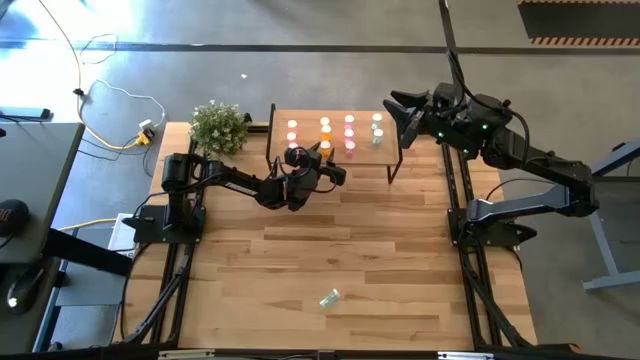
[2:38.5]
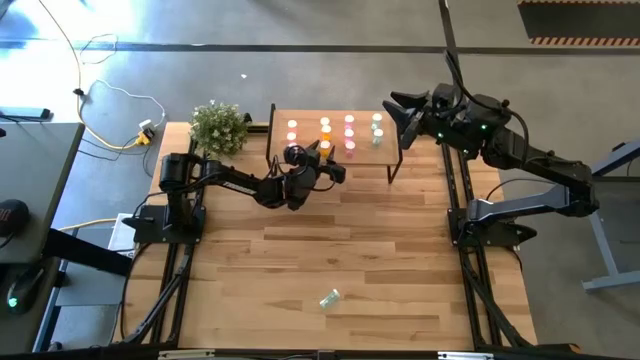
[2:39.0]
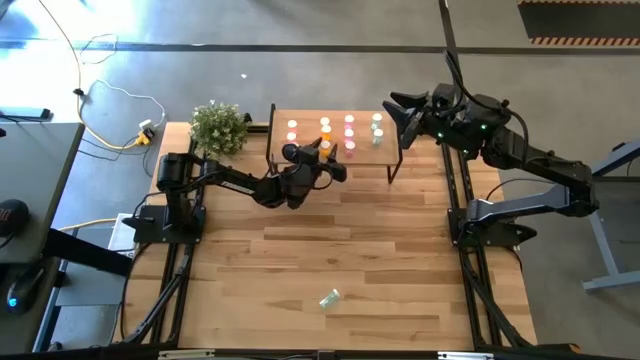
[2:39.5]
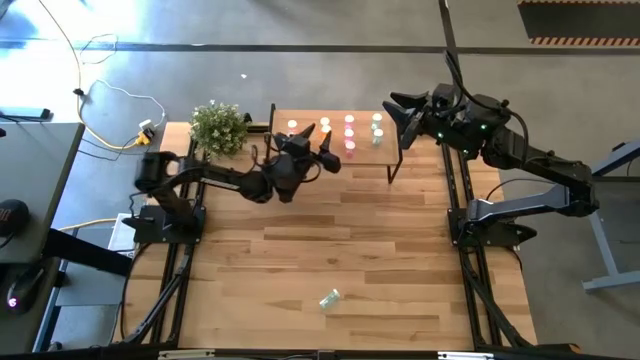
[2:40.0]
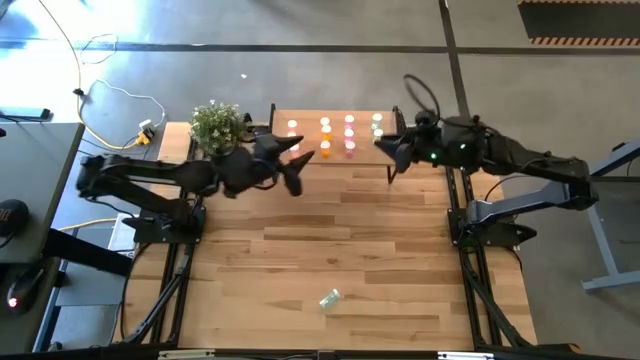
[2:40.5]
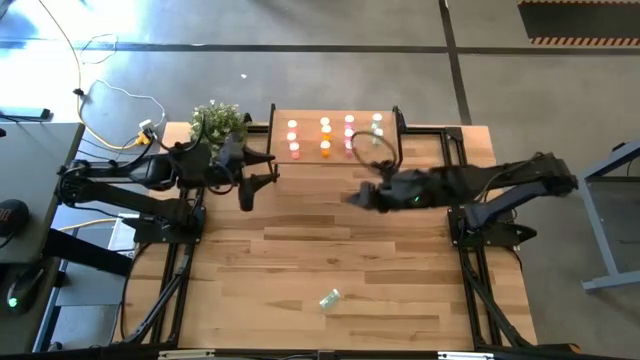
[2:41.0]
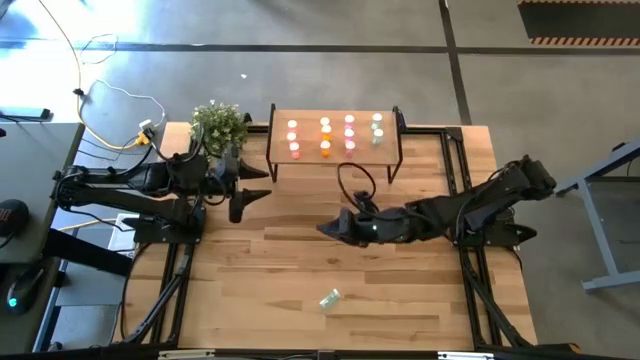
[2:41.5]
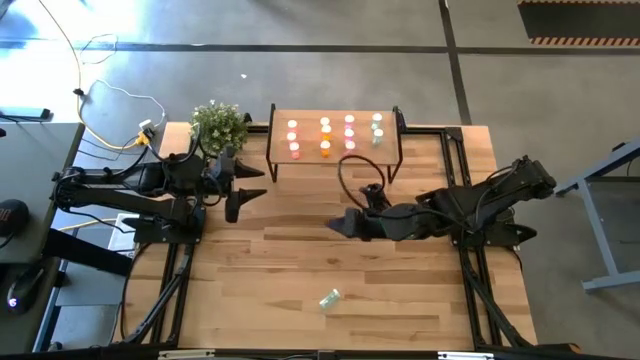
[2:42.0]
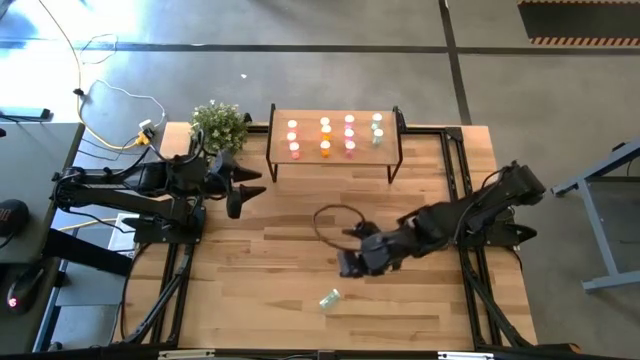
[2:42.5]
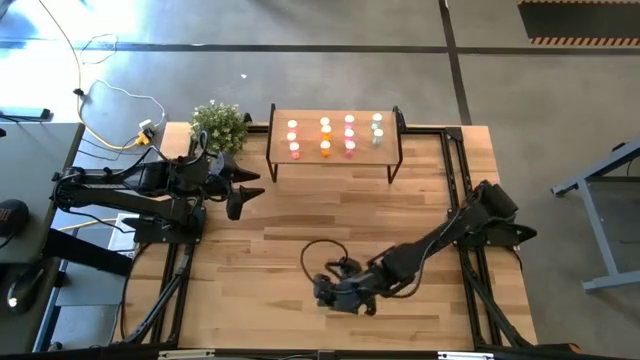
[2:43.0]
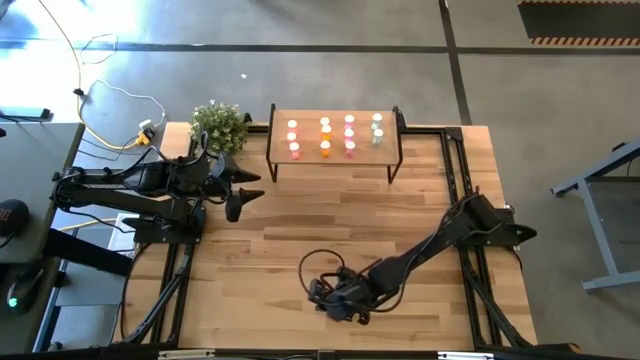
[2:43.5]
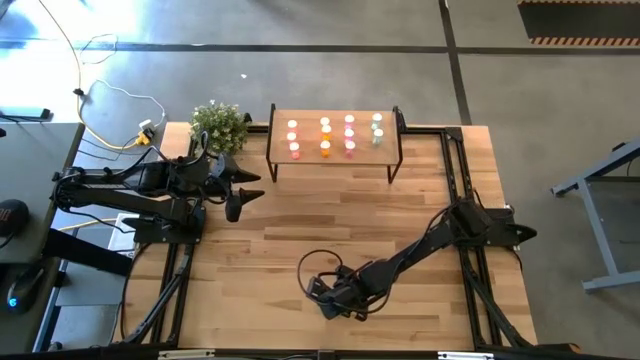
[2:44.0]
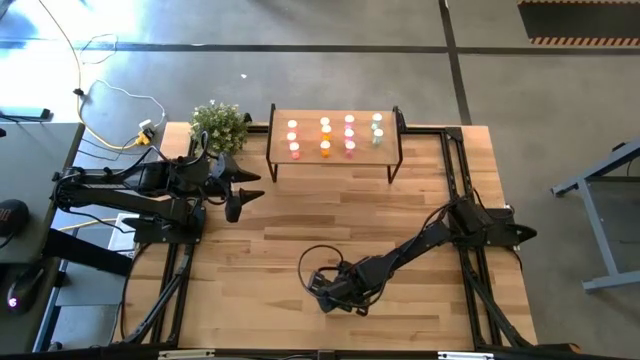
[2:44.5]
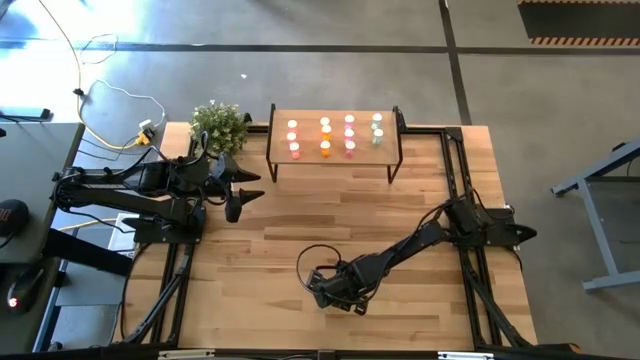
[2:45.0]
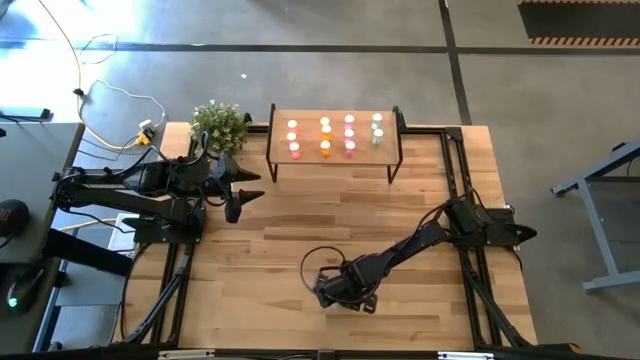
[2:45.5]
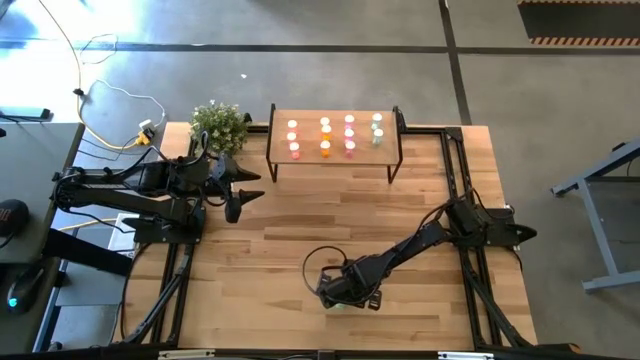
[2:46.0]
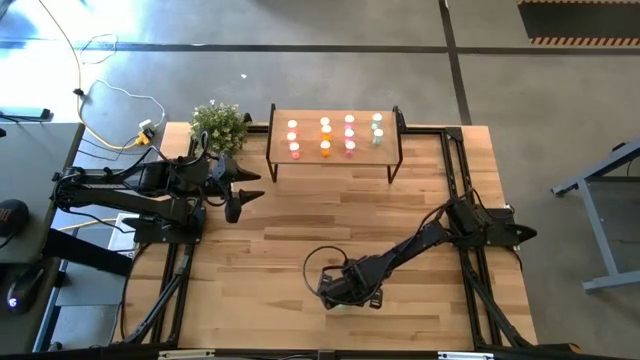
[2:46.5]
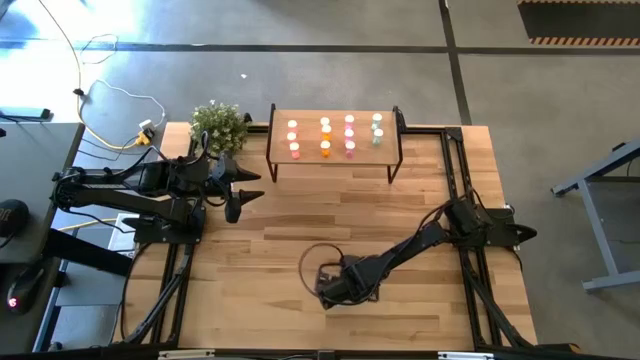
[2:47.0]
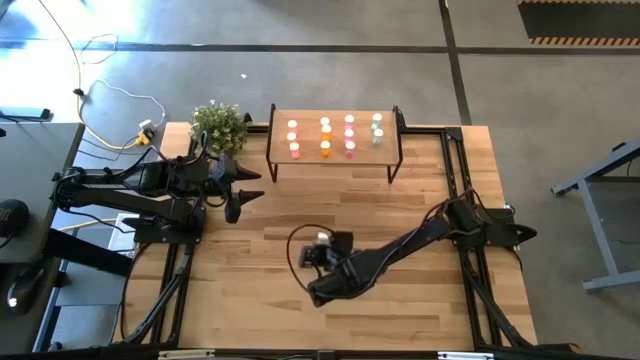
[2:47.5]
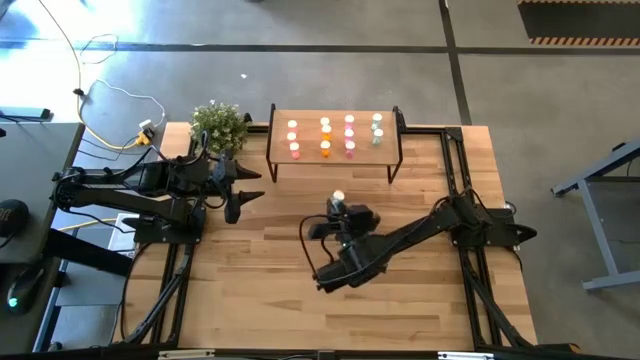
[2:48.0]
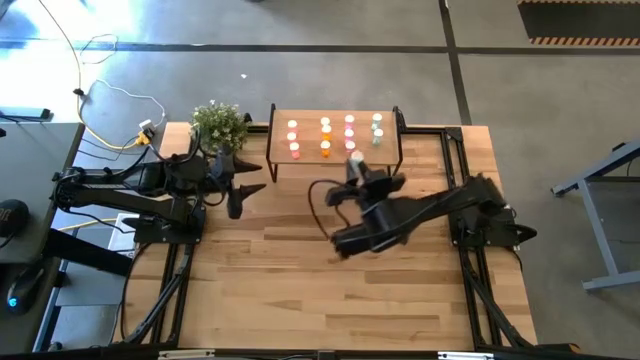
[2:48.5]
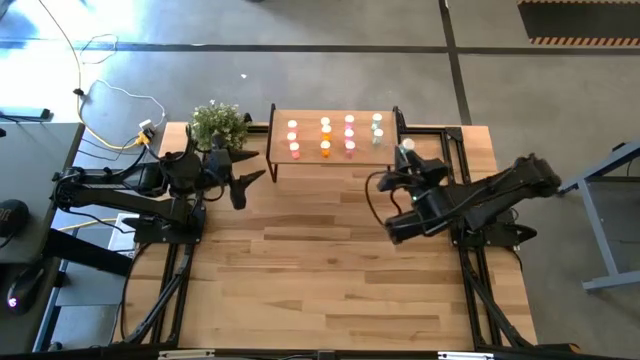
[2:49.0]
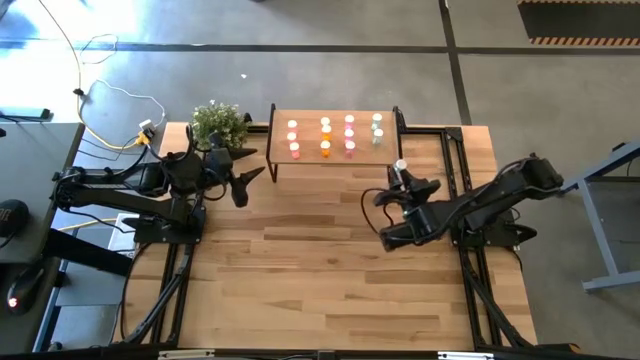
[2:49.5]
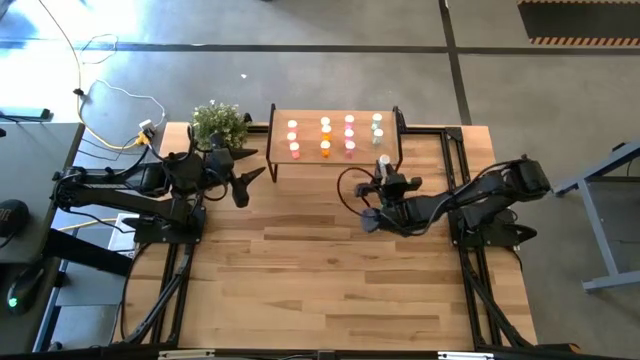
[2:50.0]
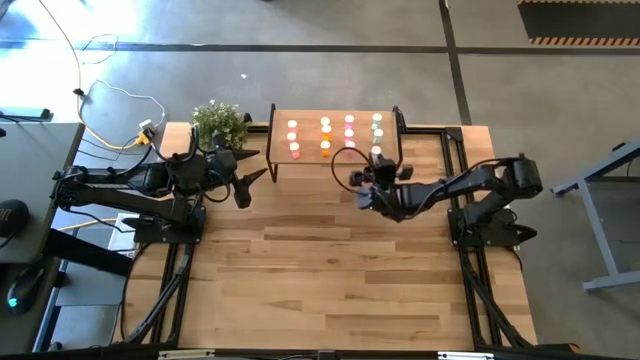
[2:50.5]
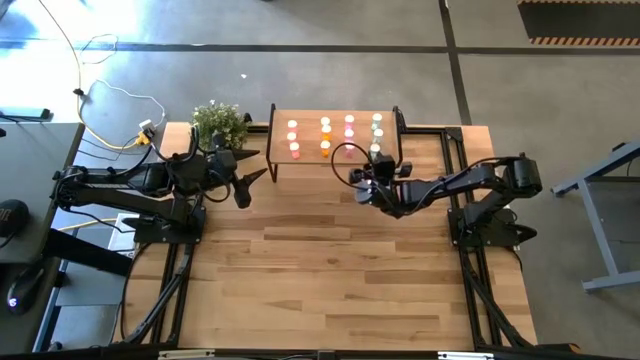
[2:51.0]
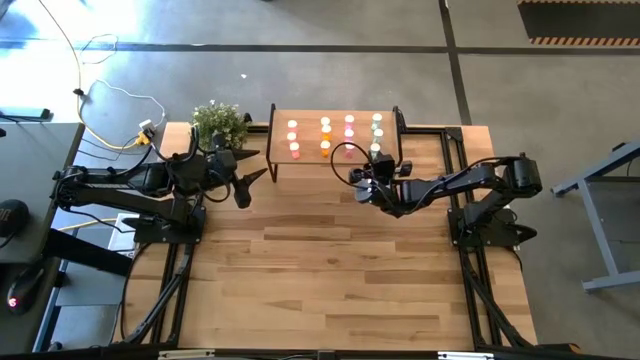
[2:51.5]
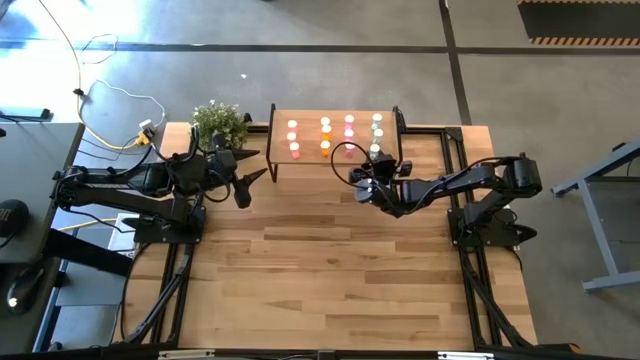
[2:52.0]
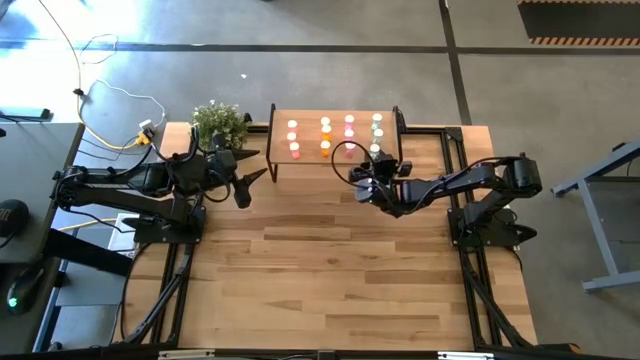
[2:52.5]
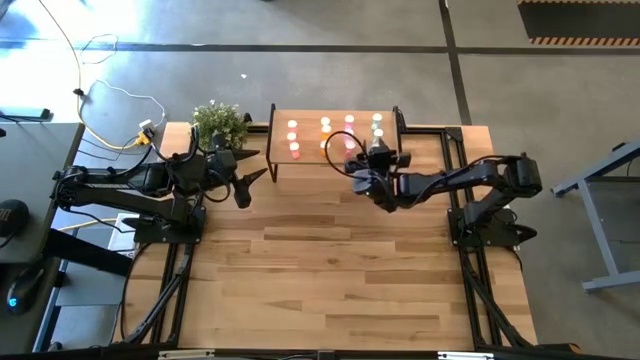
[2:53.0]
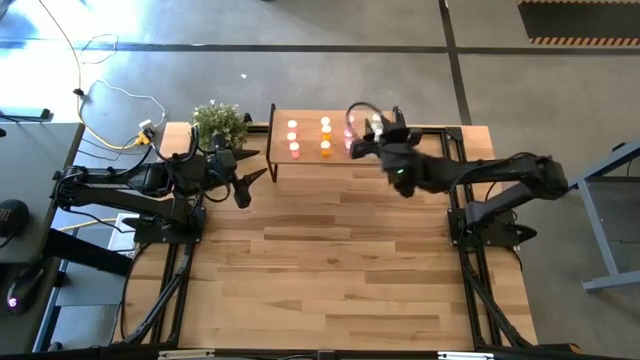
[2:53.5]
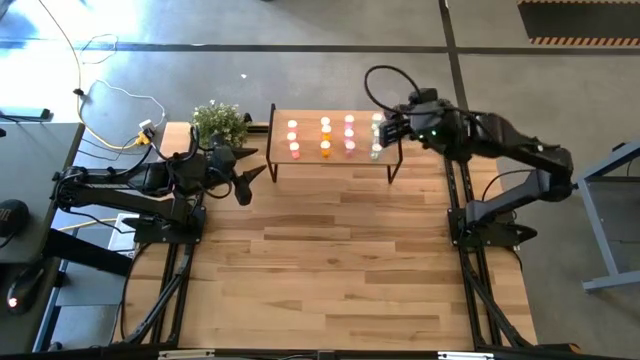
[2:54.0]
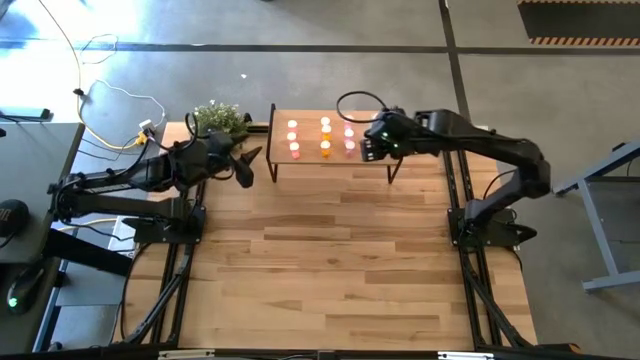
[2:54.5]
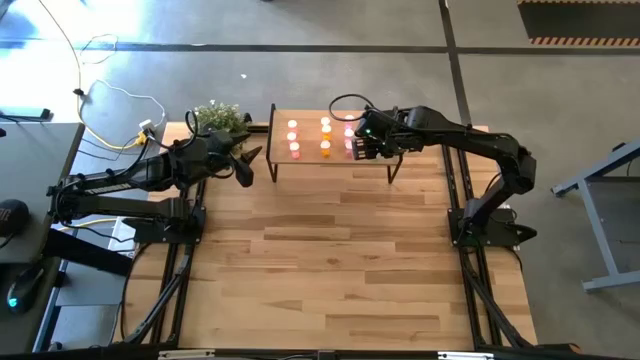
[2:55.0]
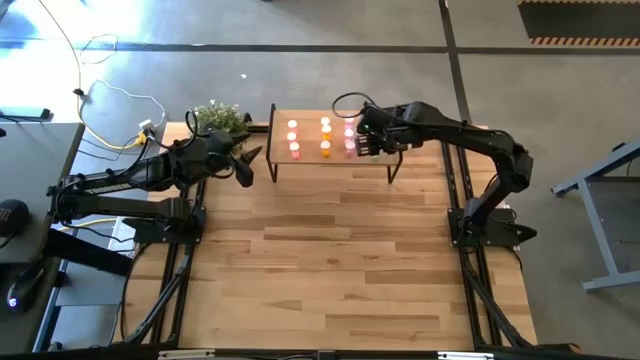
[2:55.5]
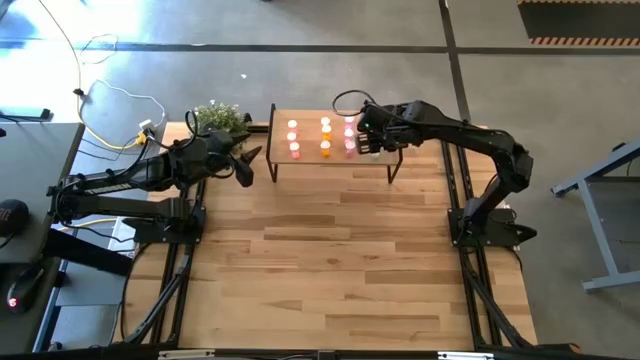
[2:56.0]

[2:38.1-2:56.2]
Task: Pick and place medicine bottles onto shelf by color
Put the blue pill bottle on the shelf aligned with the other blue pill bottles

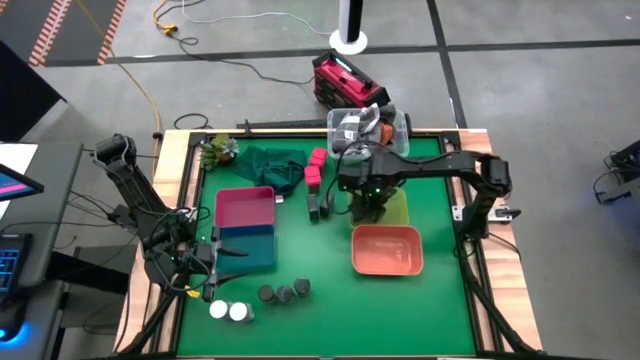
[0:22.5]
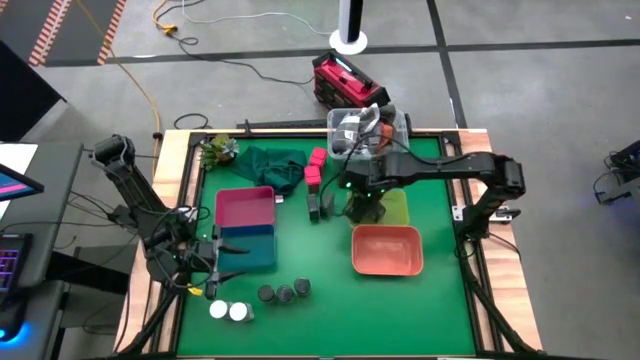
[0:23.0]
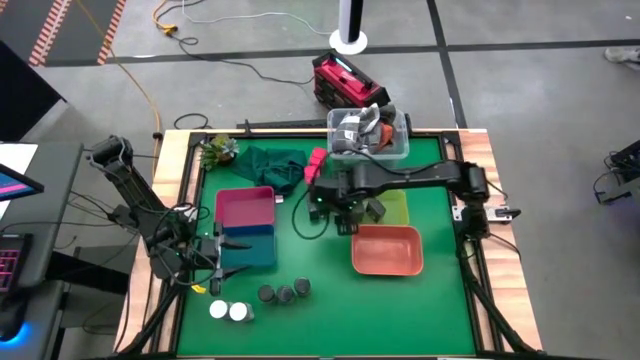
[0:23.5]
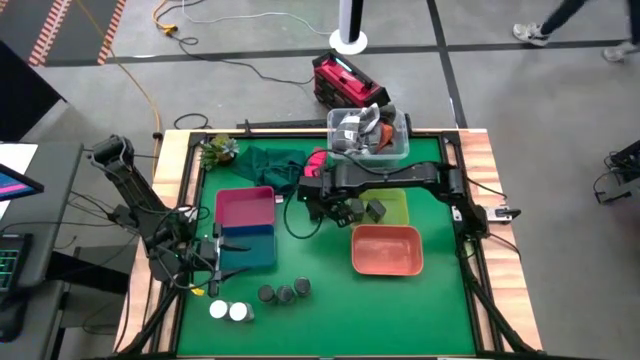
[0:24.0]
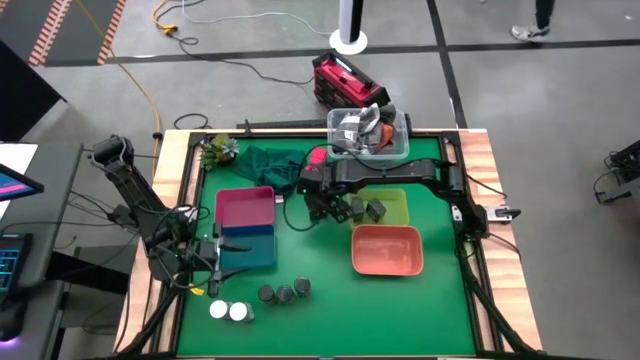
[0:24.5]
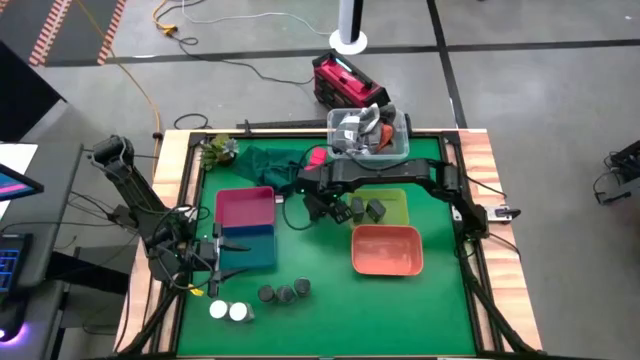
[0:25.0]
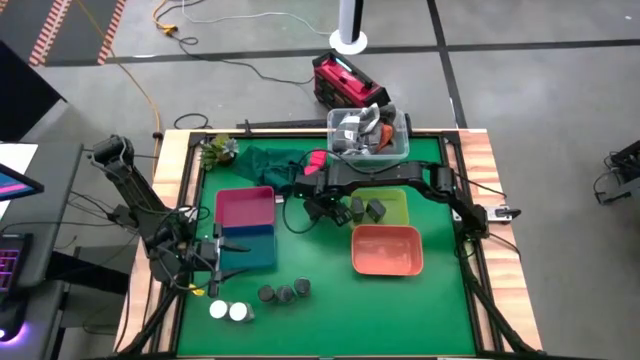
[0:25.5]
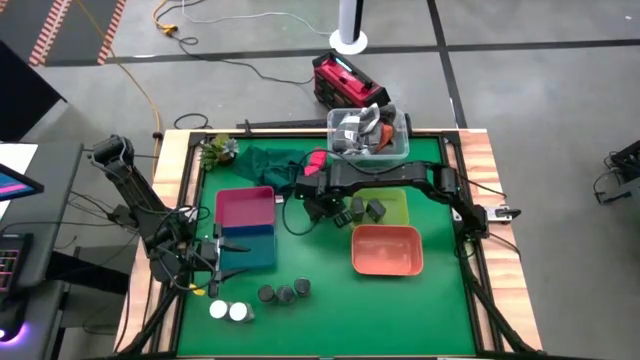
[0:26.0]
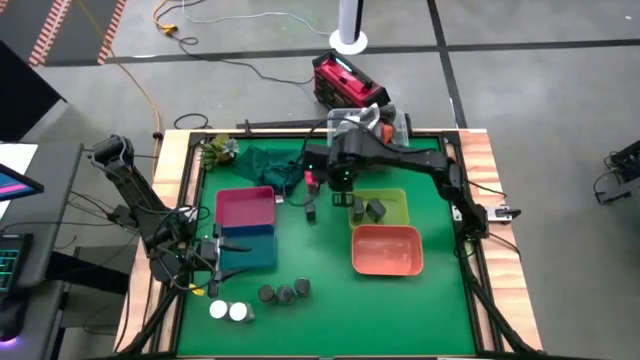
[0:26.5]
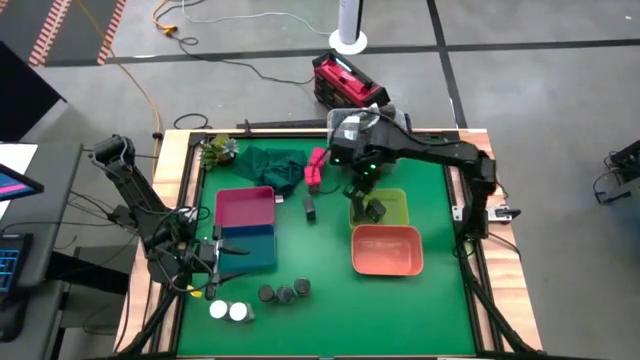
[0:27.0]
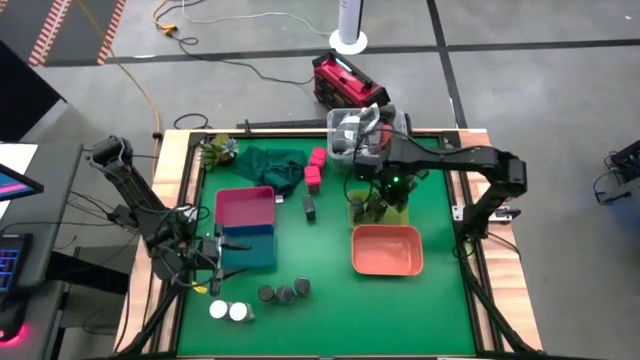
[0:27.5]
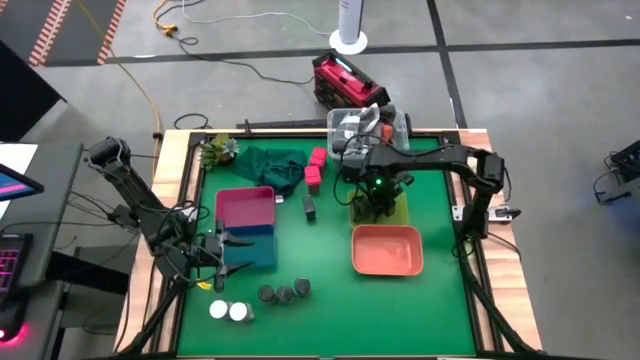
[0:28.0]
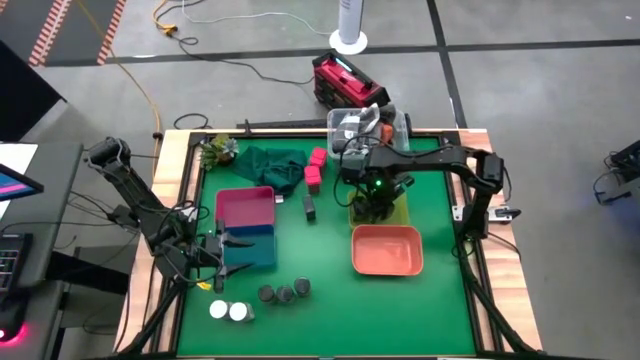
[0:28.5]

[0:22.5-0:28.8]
Task: Sort spices by type
Put the black spice can into the yellow bin
